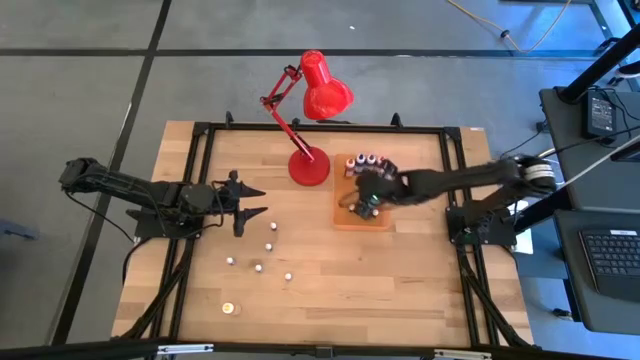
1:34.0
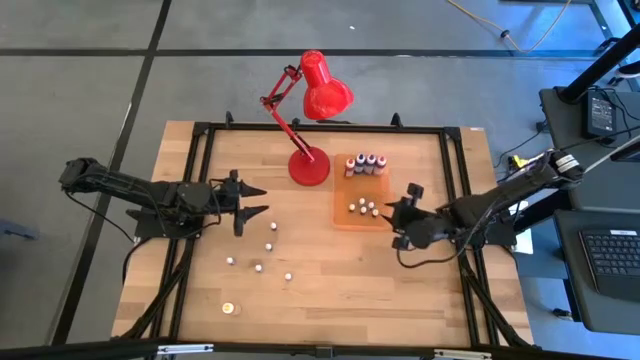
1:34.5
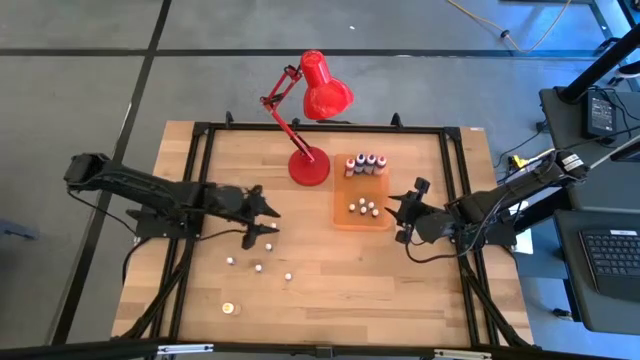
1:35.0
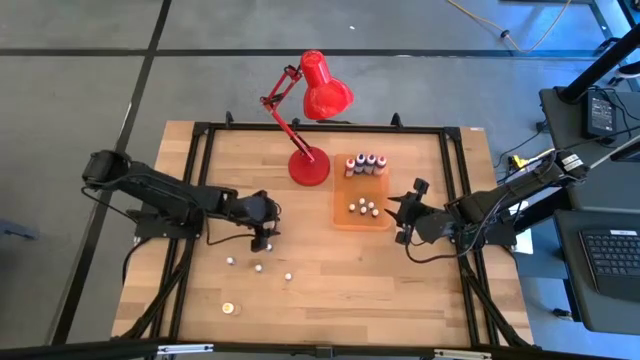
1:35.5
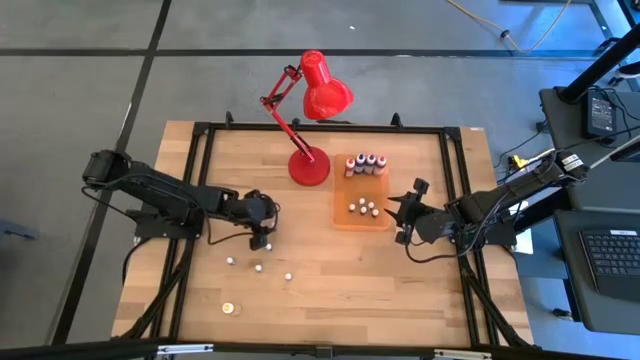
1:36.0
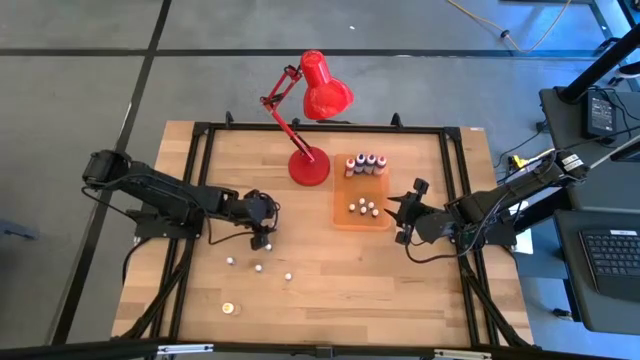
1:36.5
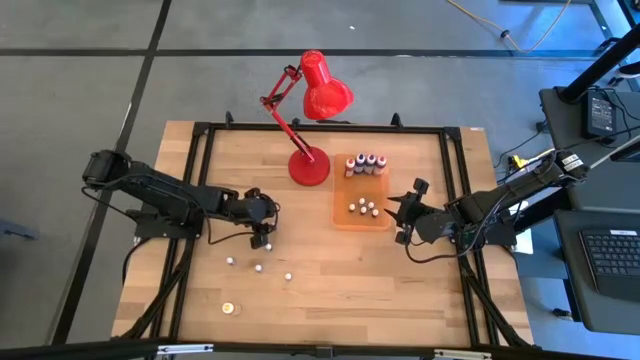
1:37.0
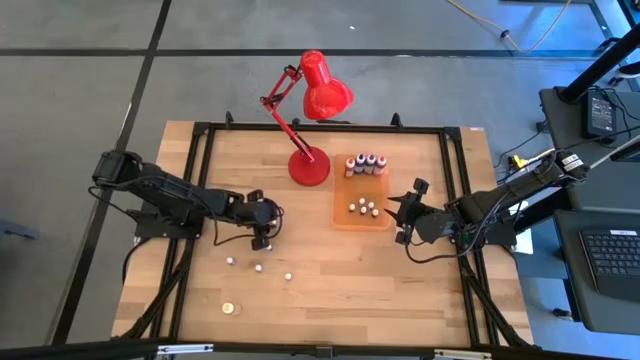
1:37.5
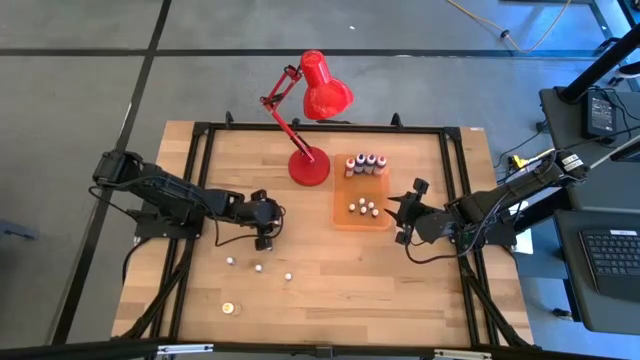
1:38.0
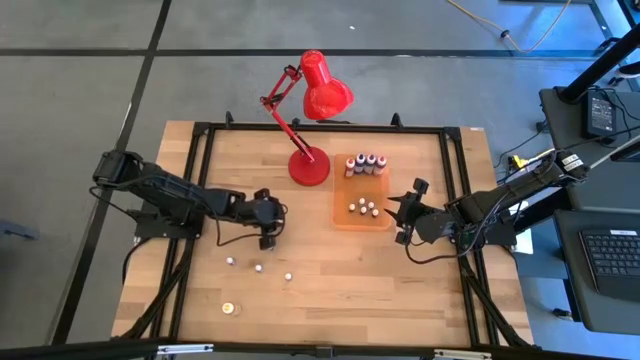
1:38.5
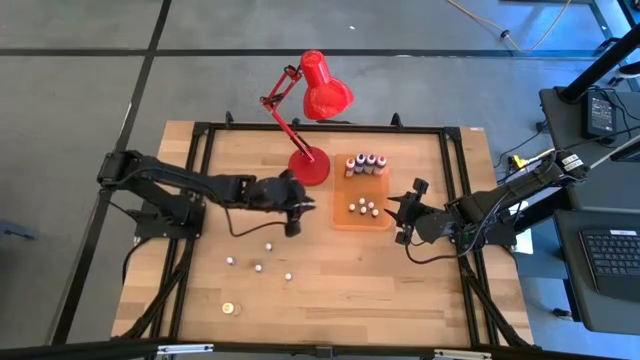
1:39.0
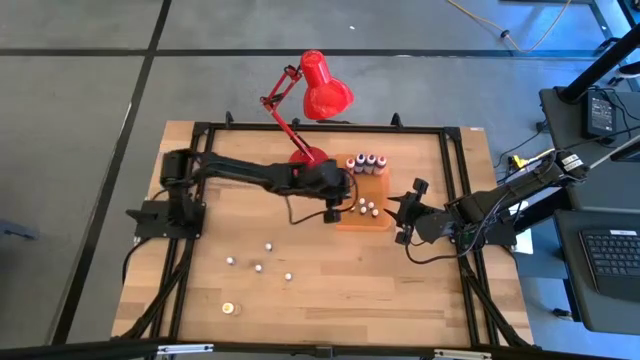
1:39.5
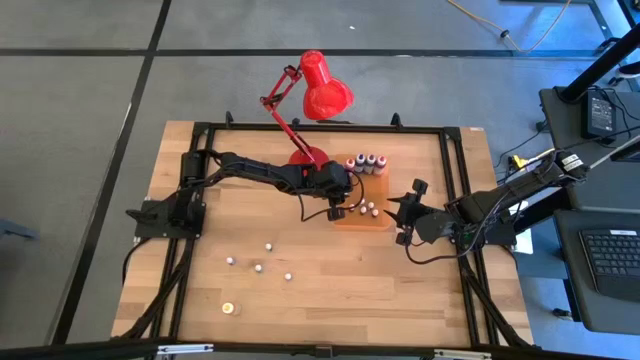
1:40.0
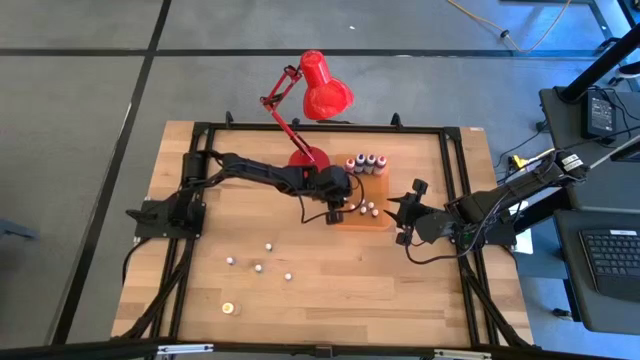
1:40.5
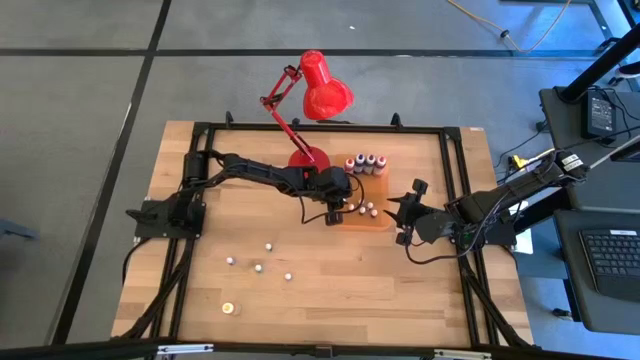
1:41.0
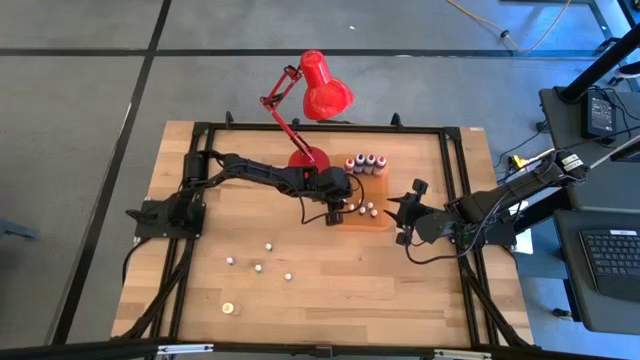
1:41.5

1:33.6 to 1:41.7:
Task: Pick & Place food coloring
Put the small pink food coloring bottle into the orange bin

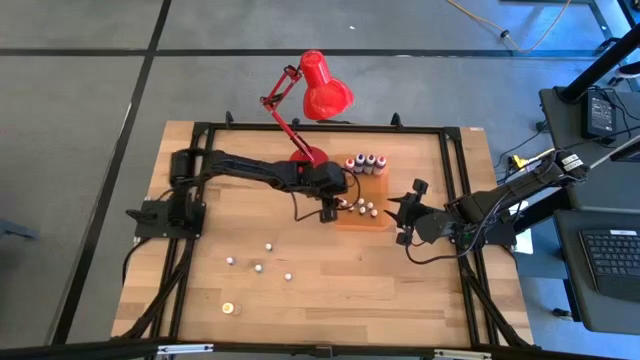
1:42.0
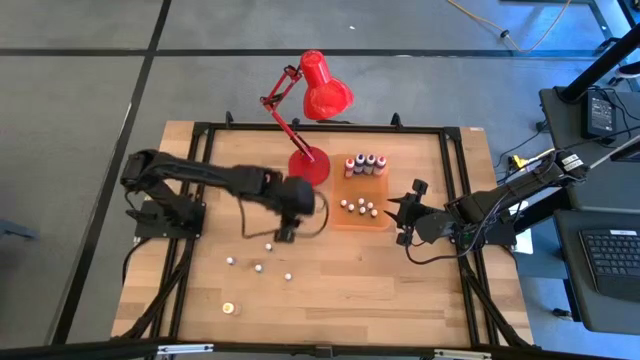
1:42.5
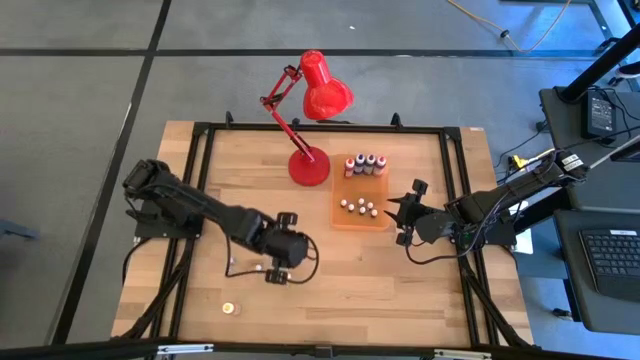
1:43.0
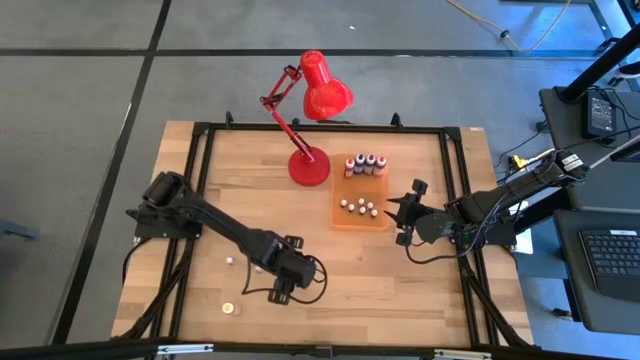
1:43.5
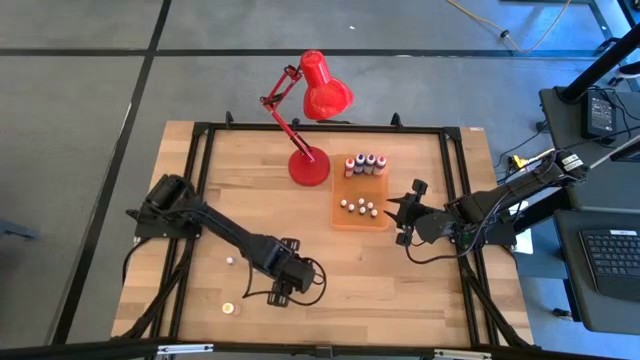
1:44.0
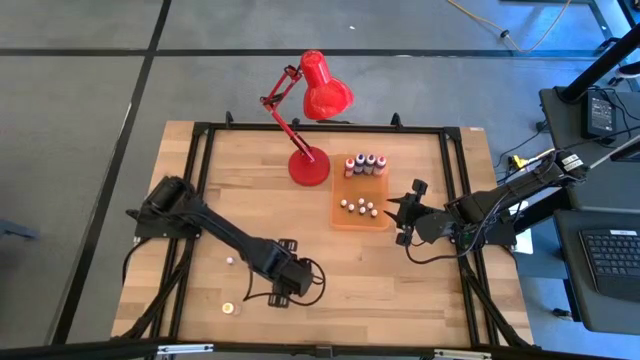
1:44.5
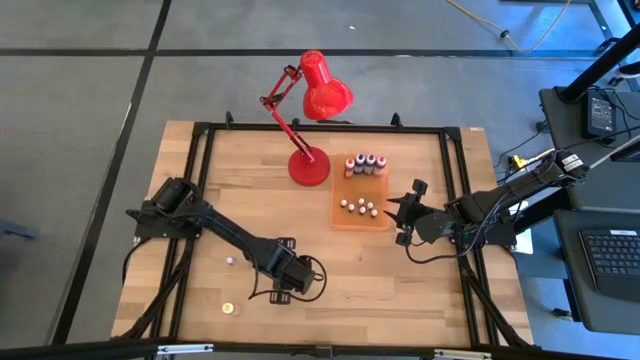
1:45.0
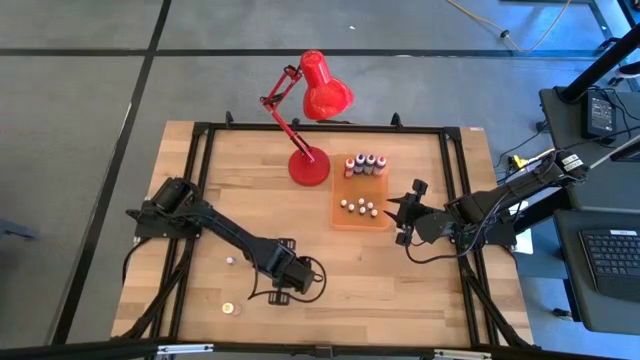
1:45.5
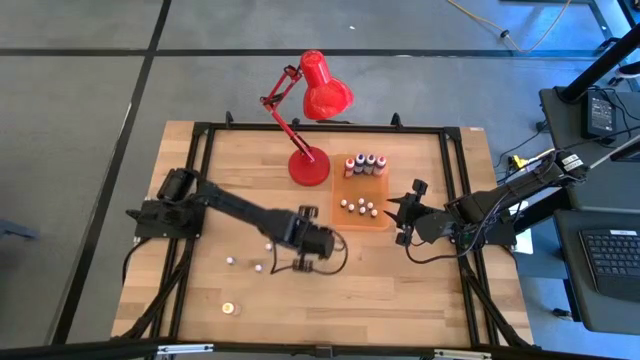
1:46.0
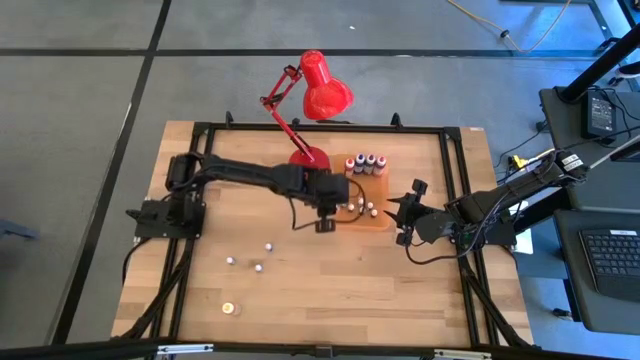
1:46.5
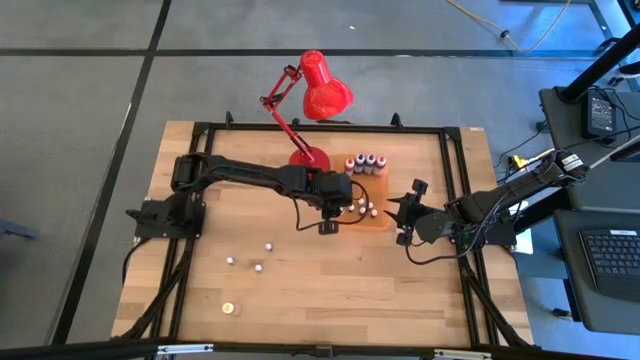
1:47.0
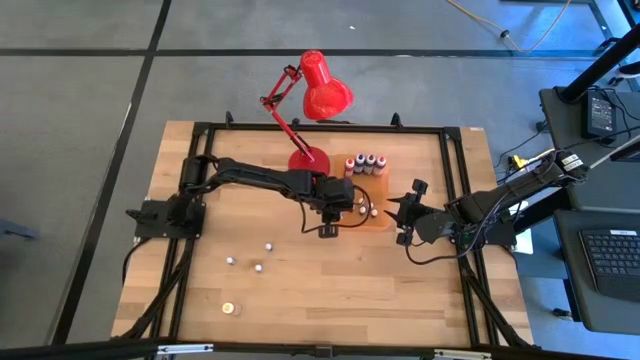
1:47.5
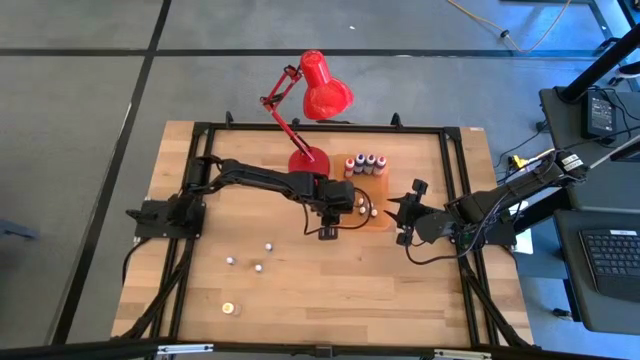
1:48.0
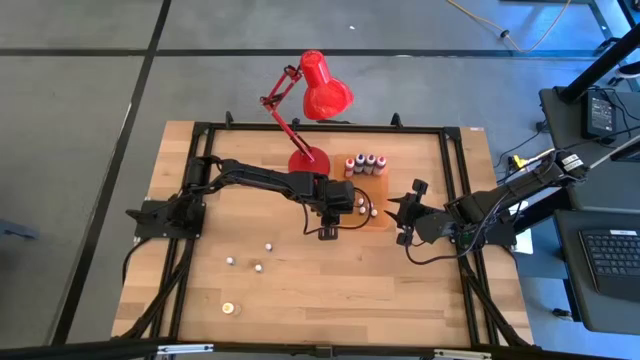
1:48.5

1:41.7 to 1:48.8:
Put the small red food coloring bottle into the orange bin

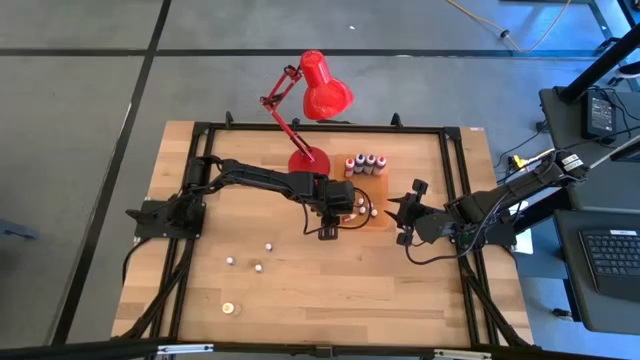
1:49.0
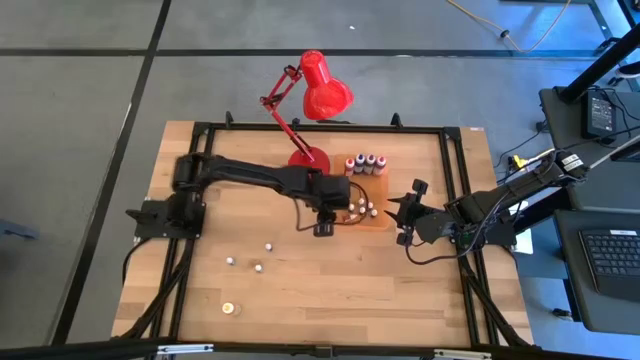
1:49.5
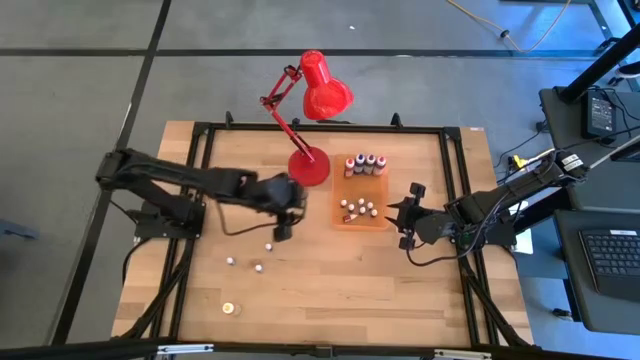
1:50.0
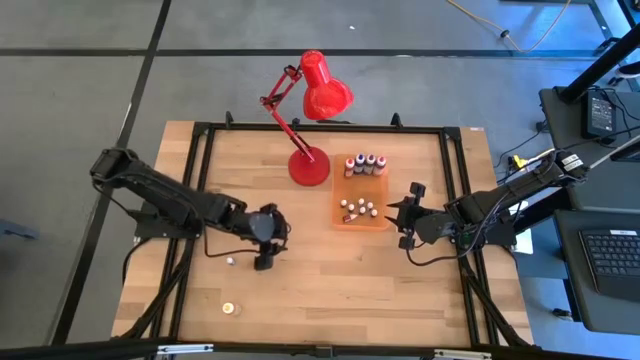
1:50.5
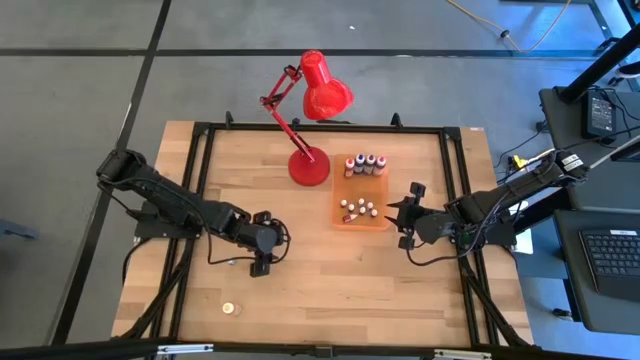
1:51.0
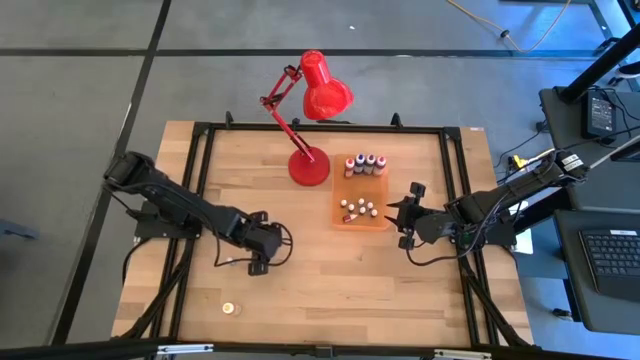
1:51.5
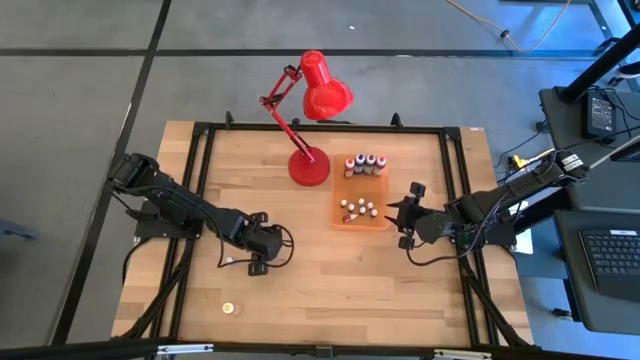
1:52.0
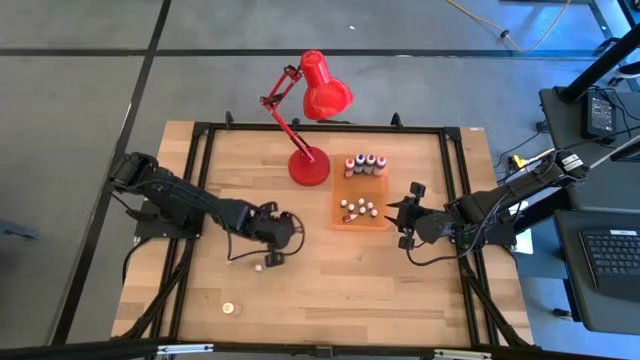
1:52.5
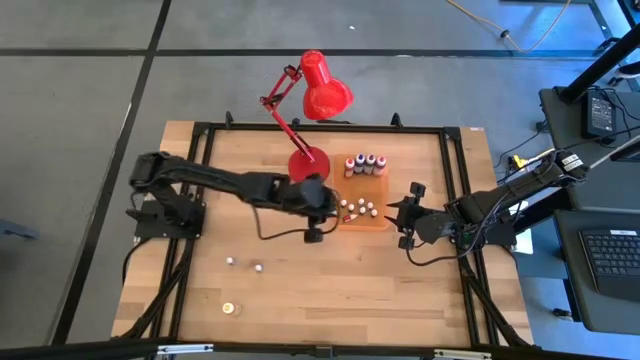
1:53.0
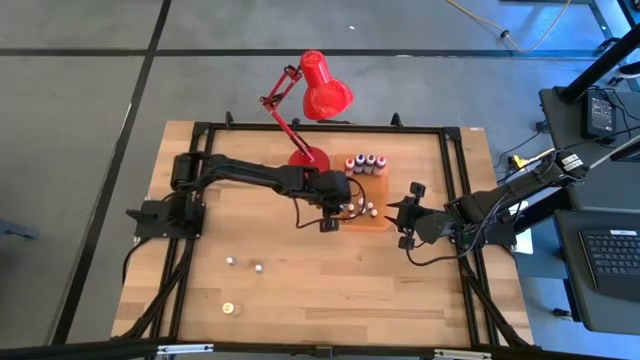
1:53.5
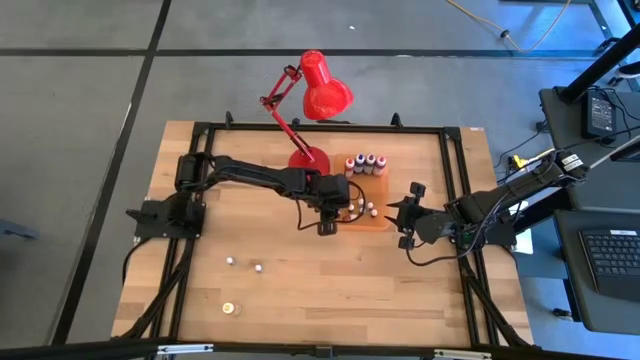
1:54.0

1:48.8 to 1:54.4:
Put the small blue food coloring bottle into the orange bin

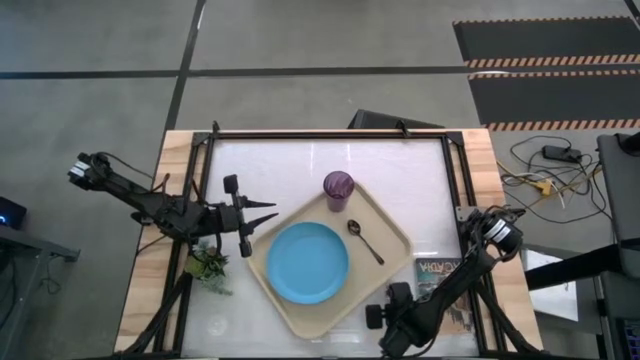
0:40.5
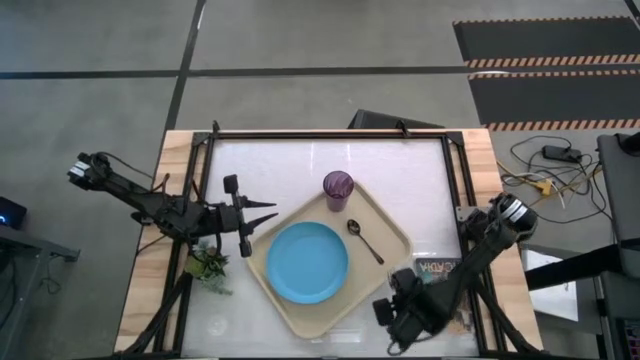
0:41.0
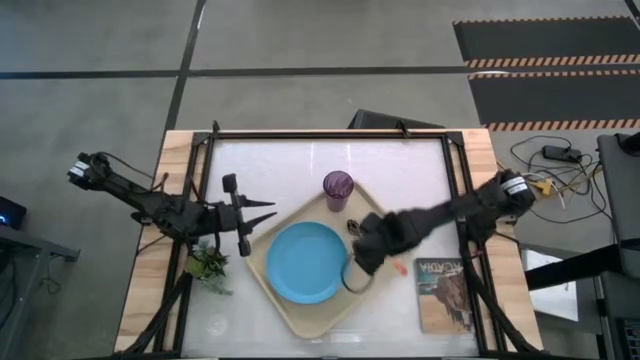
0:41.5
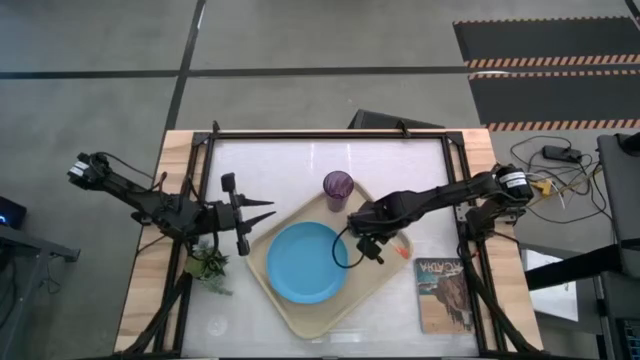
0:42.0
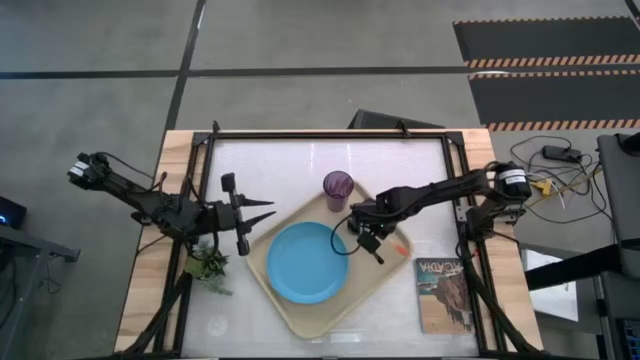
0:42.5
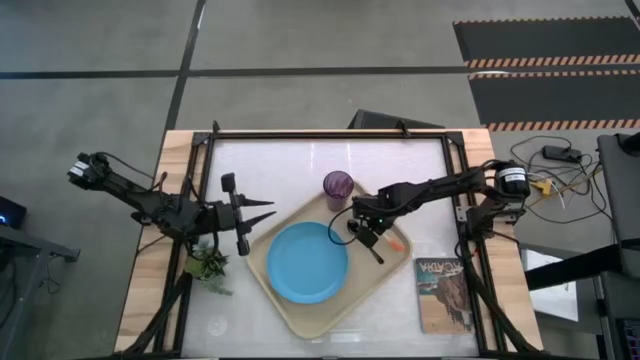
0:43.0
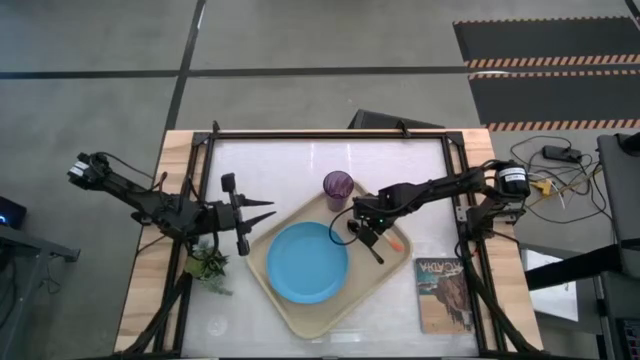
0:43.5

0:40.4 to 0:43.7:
Task: Pick and place plate/cup/fork/spoon on tray
Put the orange fork on the right side of the black spoon
